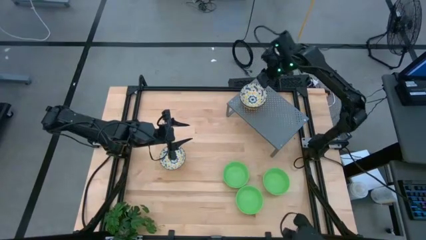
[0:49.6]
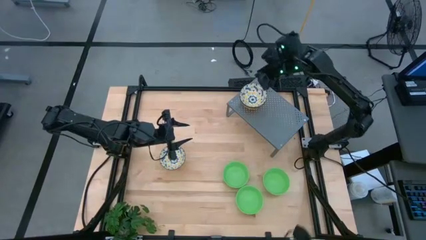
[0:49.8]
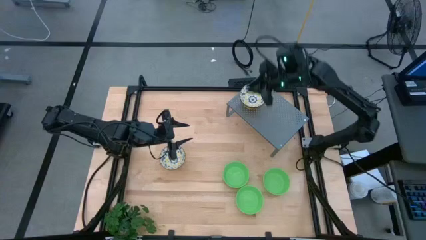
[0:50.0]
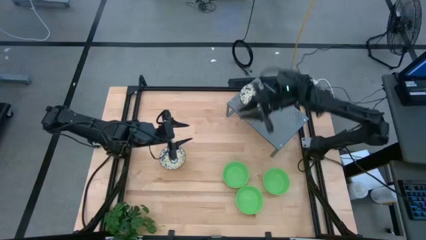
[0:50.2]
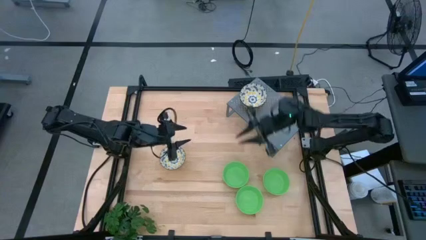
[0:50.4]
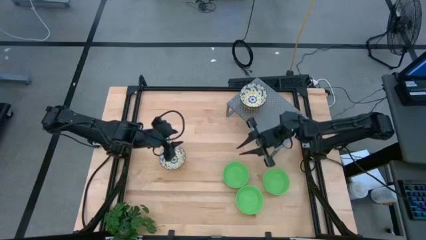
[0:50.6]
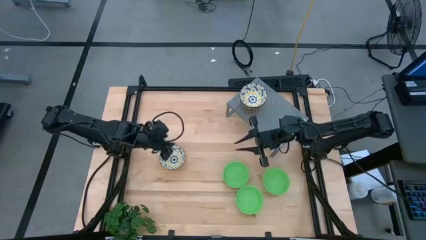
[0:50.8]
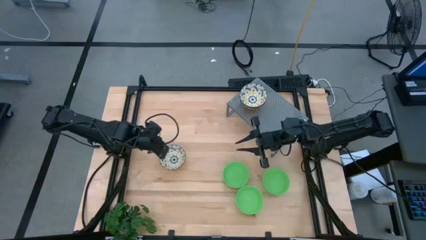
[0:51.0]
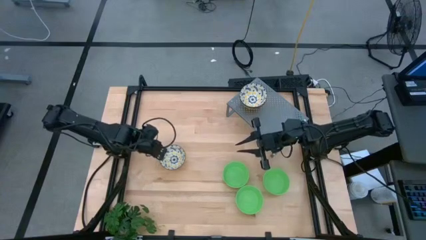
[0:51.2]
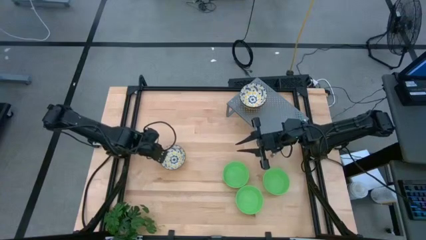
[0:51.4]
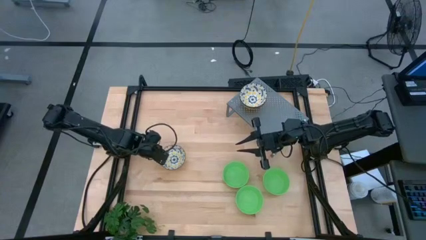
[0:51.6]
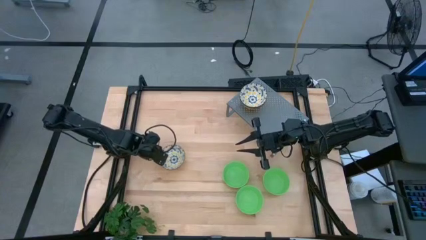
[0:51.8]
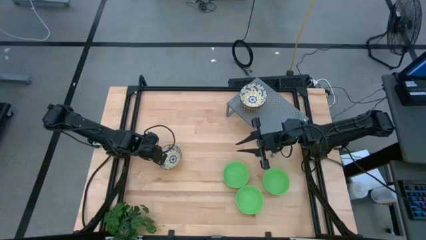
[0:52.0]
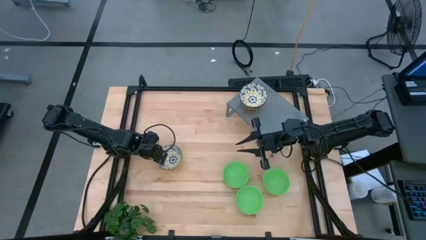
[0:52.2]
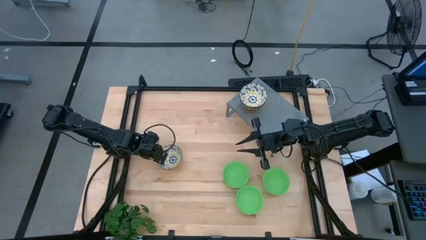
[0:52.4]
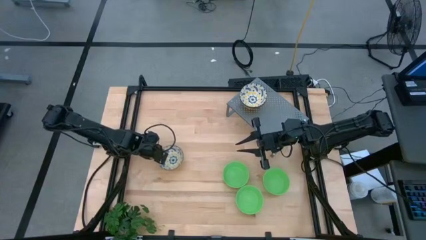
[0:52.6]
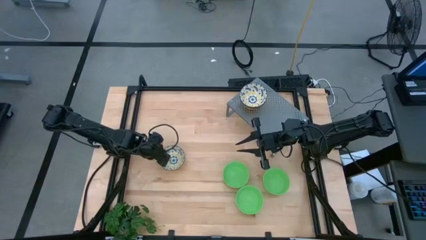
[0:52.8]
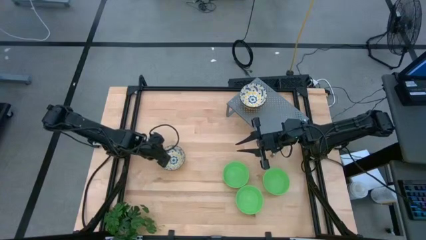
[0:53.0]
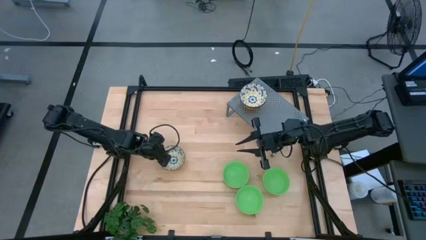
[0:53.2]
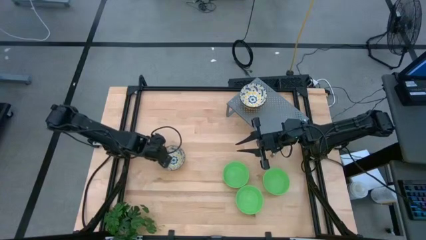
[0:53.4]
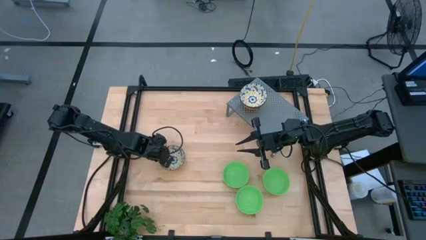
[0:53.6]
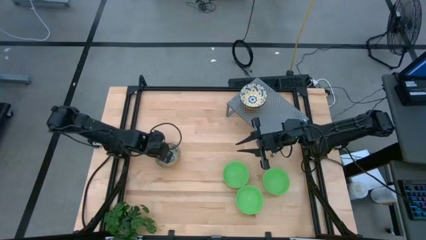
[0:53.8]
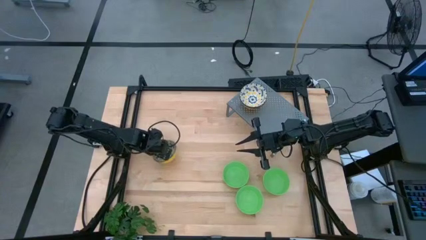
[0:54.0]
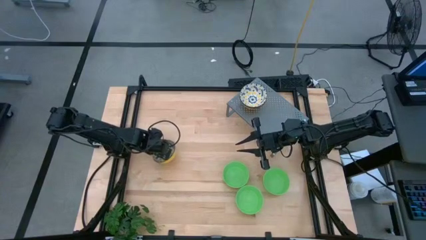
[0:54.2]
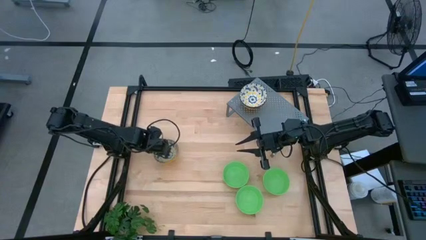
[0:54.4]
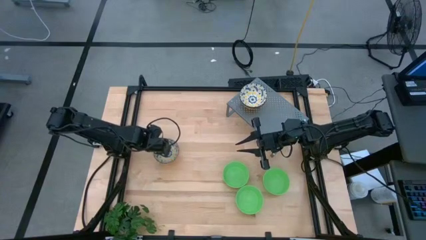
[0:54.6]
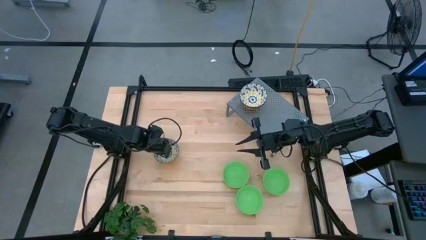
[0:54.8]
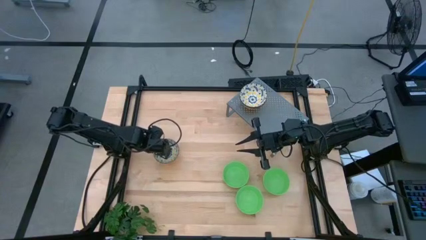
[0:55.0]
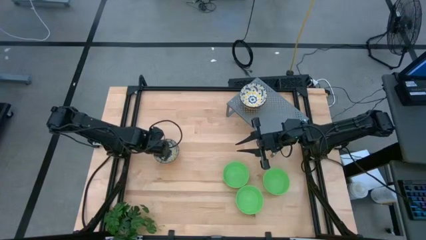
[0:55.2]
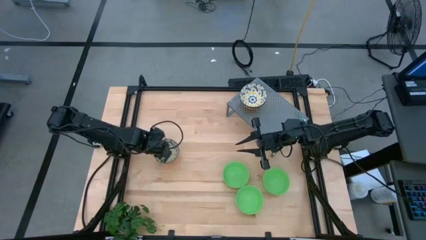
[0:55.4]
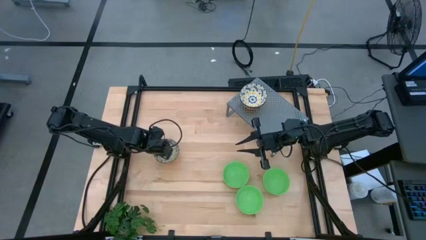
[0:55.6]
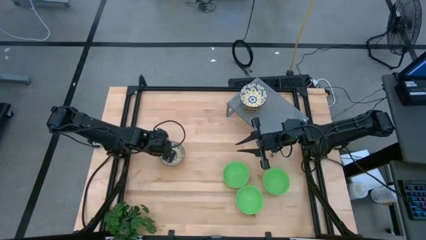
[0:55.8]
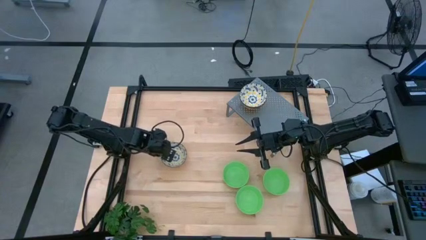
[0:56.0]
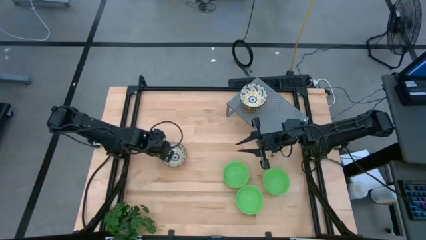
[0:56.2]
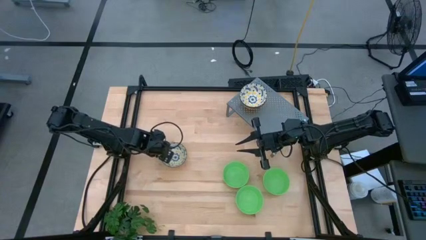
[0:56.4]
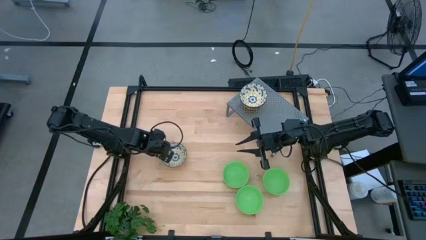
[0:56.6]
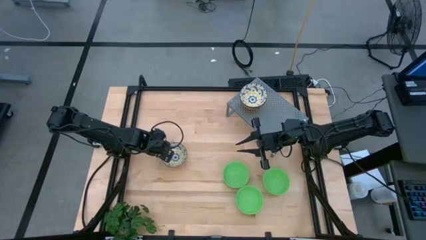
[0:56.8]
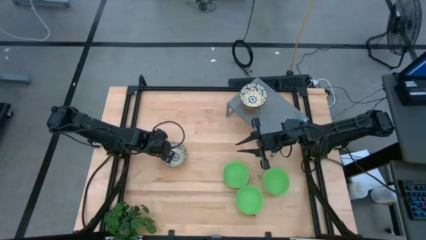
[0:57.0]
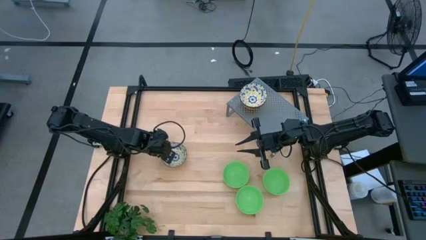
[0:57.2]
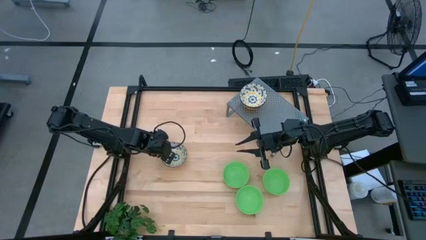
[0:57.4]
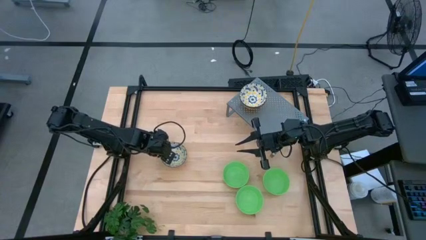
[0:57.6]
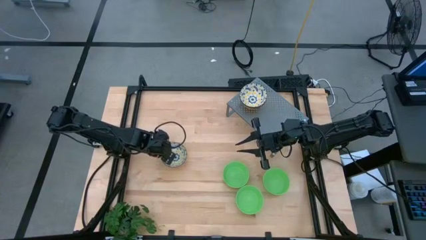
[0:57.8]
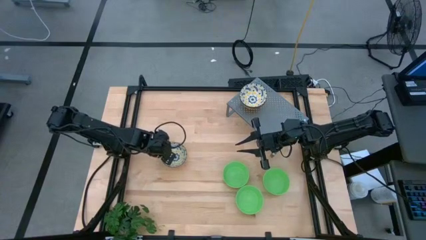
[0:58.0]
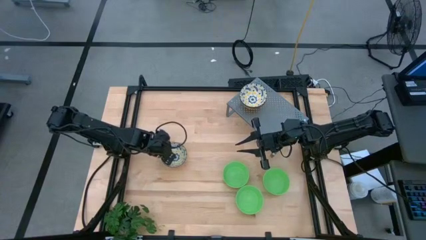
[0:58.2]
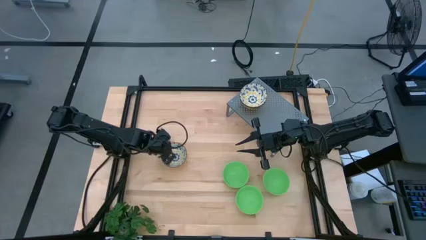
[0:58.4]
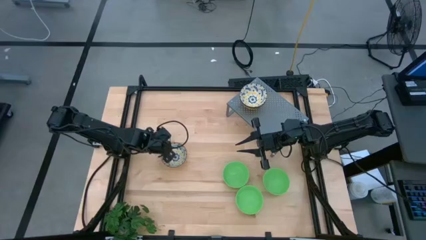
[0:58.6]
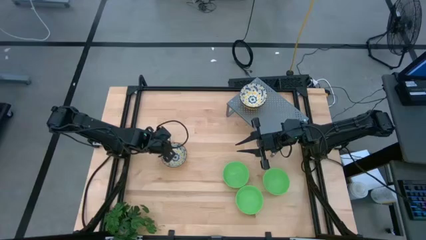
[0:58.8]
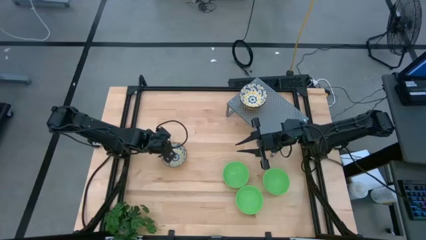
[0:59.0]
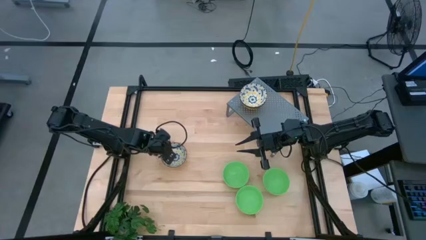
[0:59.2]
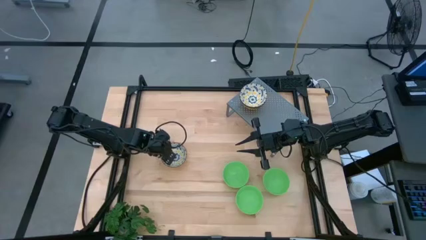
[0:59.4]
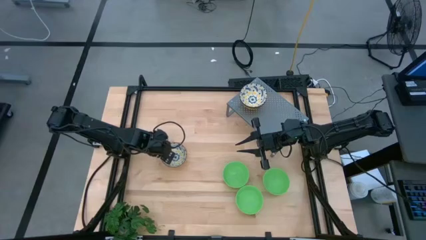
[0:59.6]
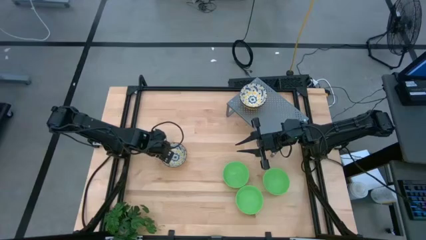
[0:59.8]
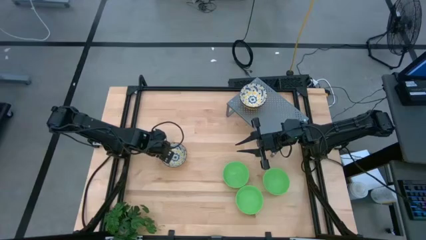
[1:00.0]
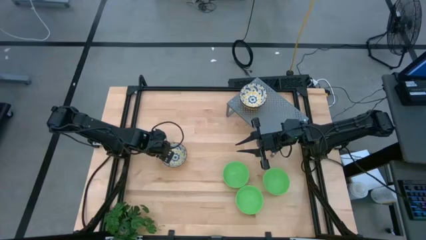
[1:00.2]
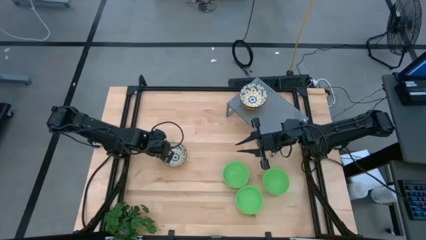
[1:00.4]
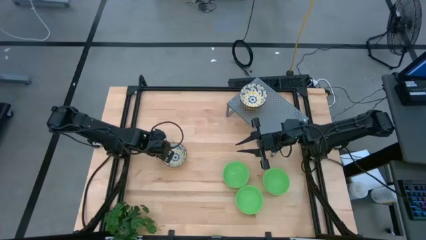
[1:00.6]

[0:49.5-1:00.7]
Task: Pick & Place Mini bowls
Stack the yellow bowl on the stacked yellow bowl on the shelf

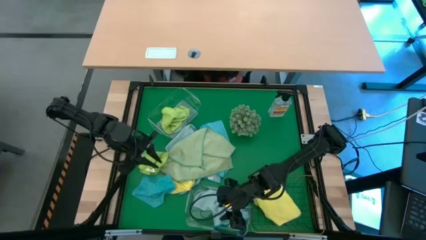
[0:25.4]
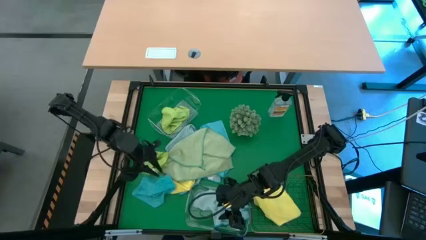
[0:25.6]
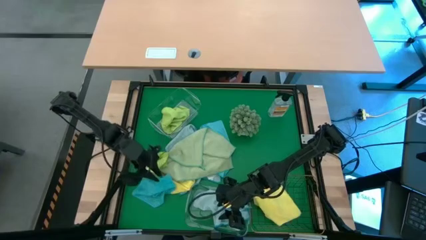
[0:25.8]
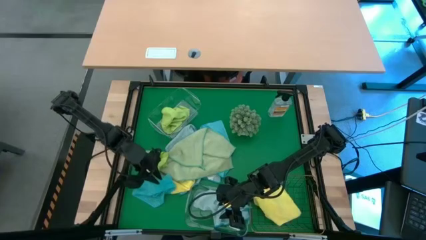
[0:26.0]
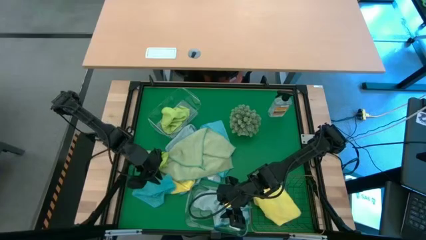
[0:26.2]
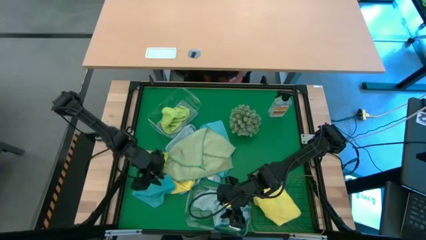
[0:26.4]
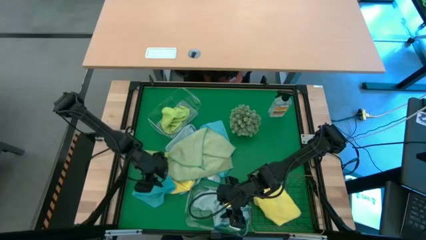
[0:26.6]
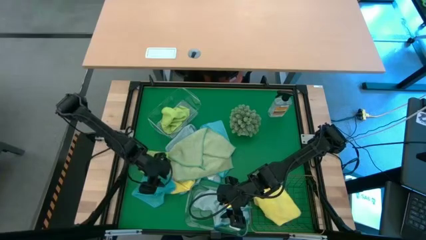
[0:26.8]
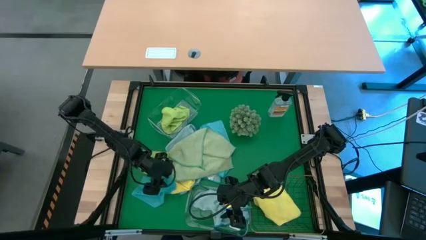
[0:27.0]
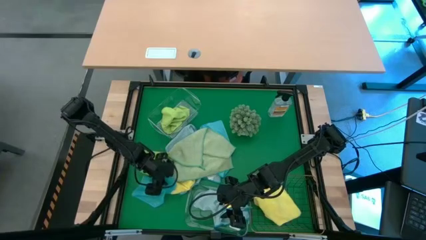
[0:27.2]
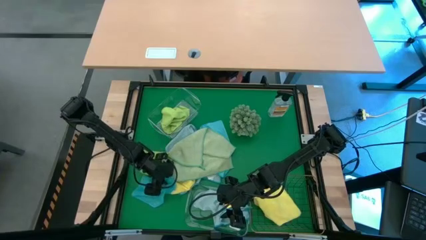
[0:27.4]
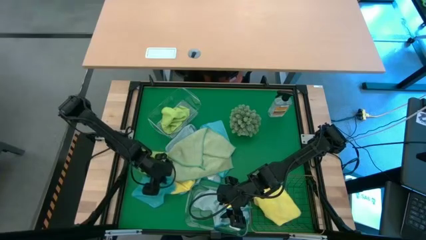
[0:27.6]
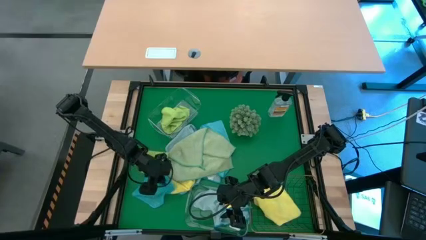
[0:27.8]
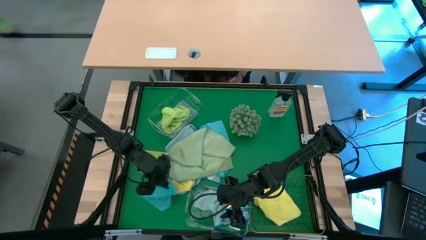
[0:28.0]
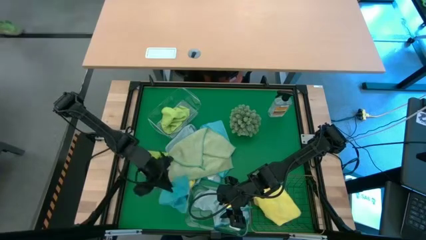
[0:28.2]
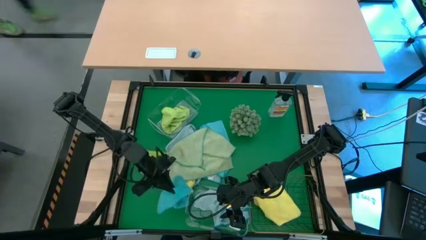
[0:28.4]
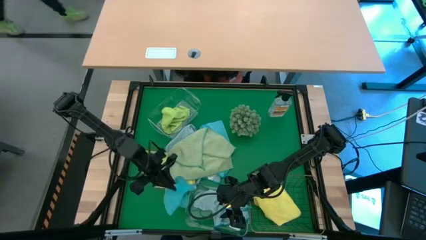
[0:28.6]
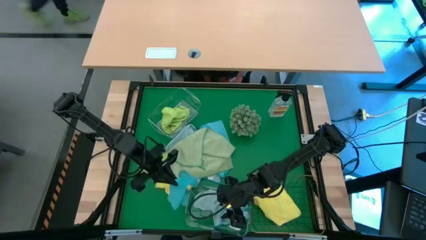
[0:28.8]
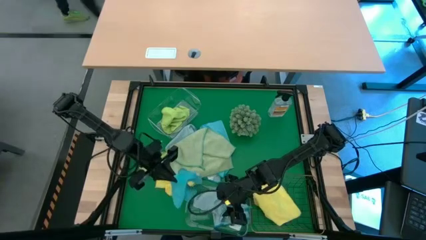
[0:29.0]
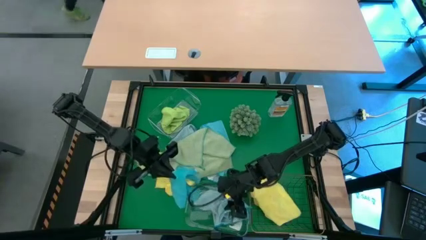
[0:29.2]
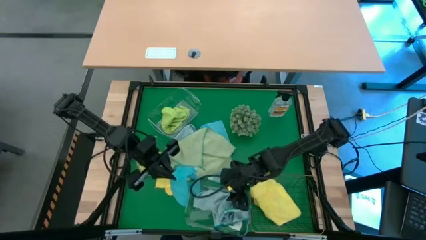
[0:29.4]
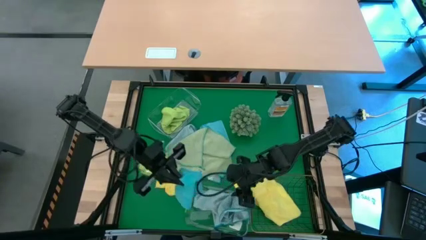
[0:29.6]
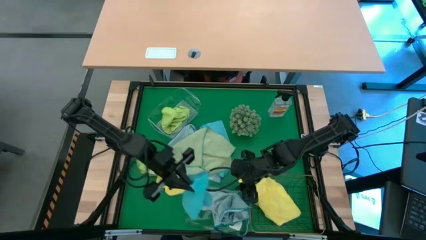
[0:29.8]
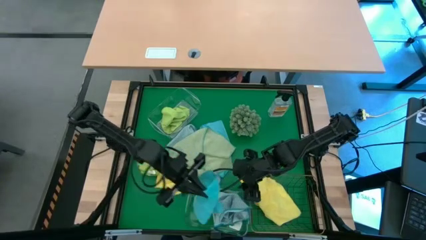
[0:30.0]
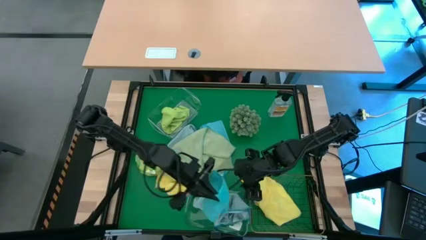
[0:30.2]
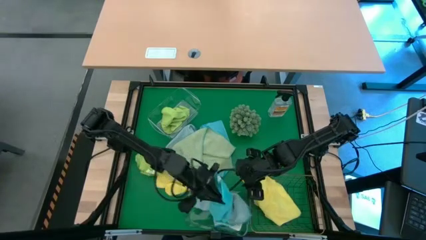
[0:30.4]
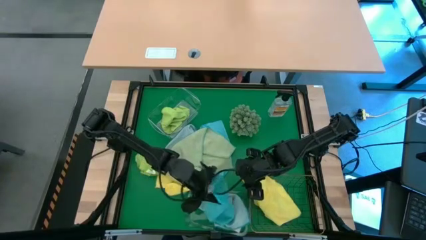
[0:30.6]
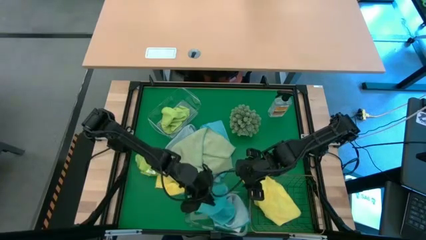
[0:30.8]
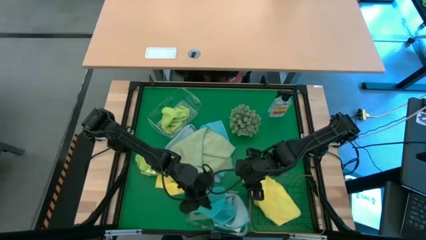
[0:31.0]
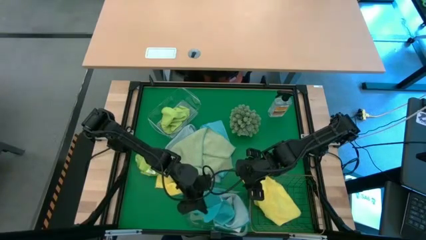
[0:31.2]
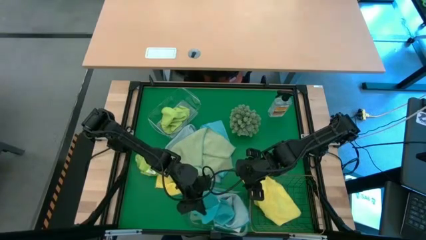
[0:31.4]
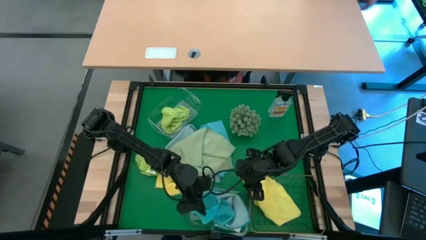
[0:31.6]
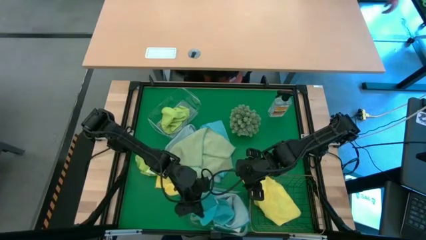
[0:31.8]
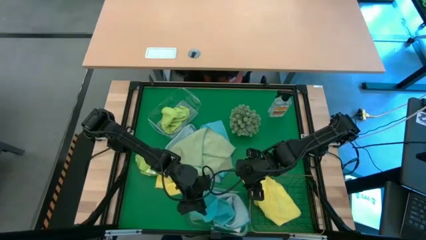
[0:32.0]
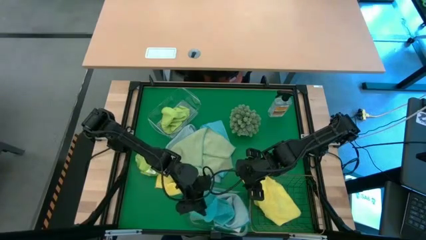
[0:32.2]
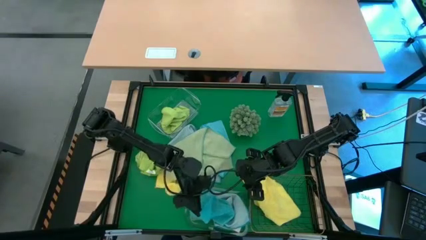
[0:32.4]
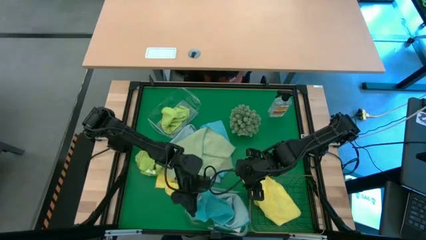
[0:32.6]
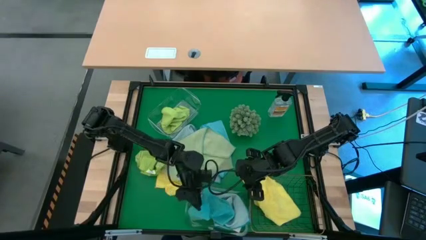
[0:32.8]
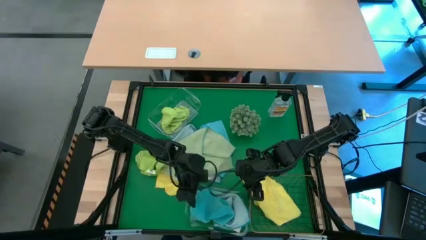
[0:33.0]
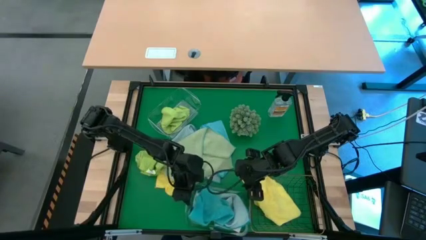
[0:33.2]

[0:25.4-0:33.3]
Task: Sort microfiber towel by color & place in baskets
Put the blue microfiber cloth into the bottom transparent bin
